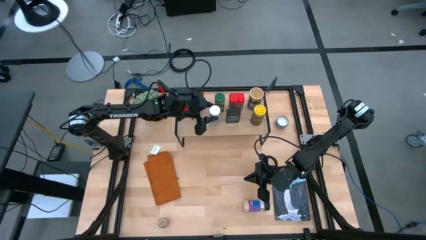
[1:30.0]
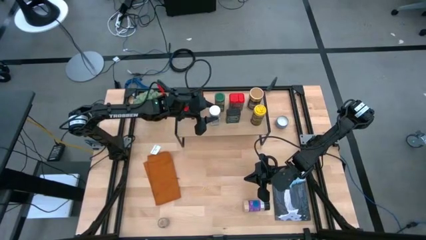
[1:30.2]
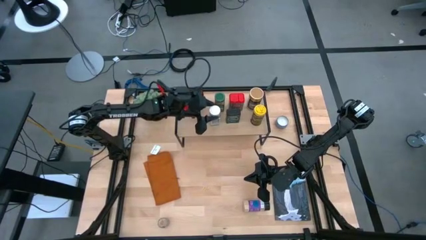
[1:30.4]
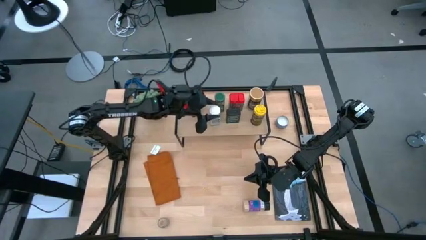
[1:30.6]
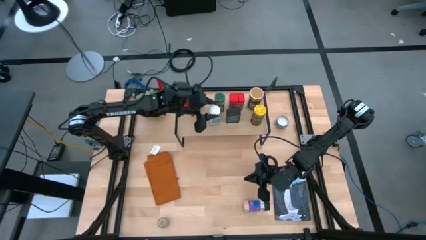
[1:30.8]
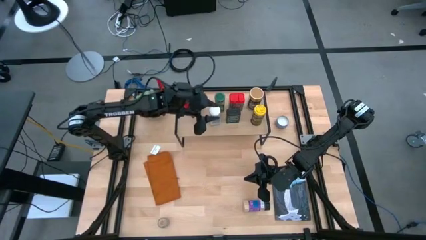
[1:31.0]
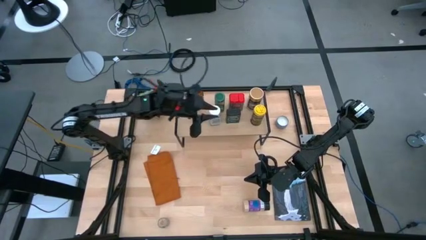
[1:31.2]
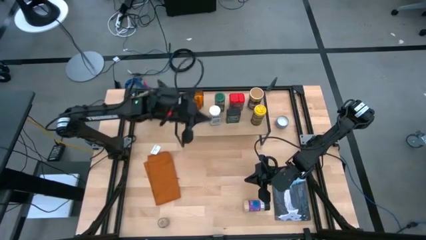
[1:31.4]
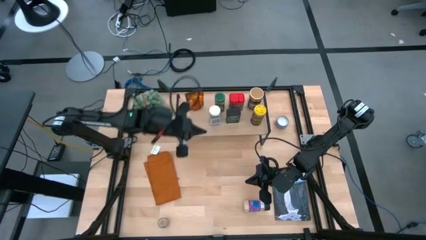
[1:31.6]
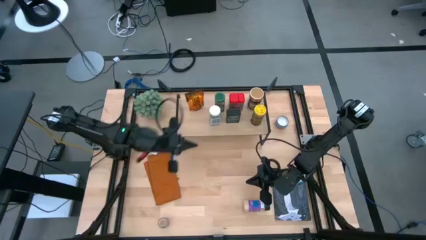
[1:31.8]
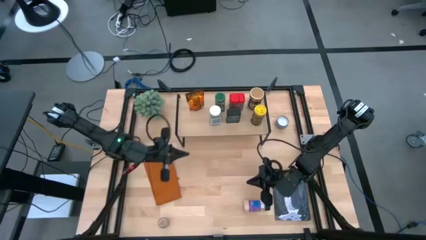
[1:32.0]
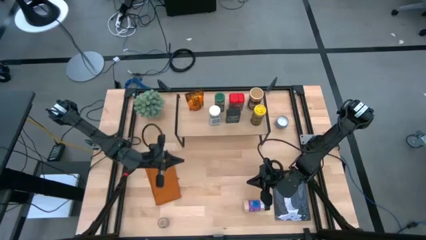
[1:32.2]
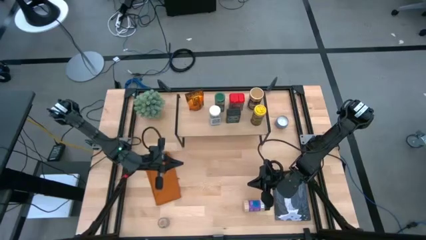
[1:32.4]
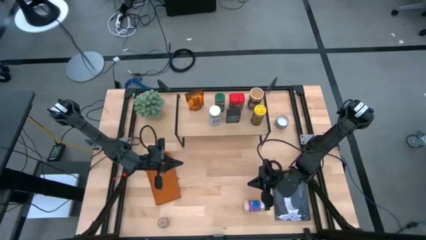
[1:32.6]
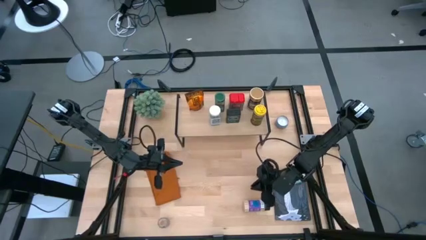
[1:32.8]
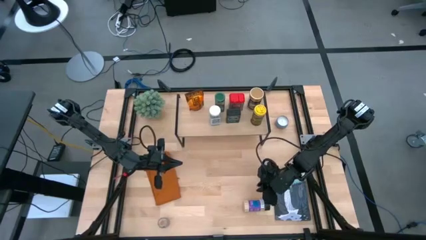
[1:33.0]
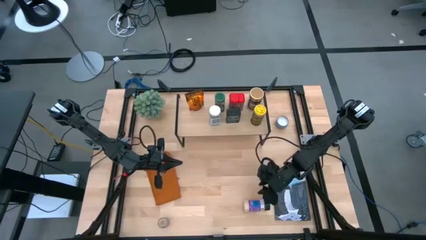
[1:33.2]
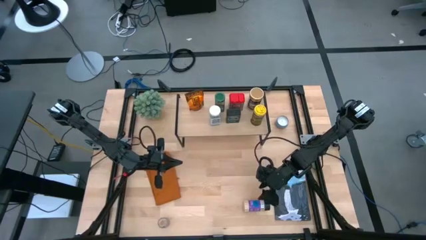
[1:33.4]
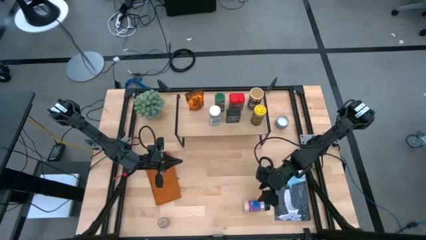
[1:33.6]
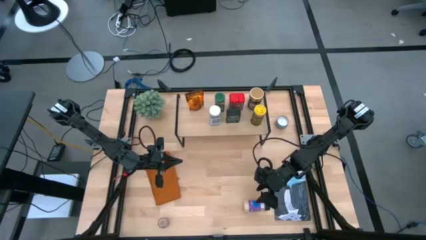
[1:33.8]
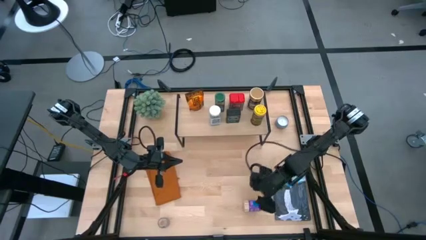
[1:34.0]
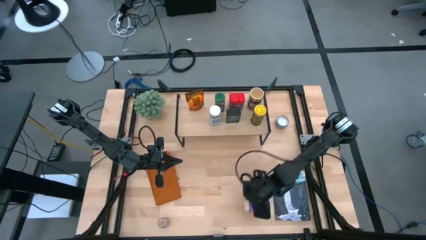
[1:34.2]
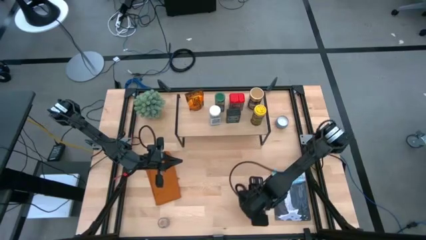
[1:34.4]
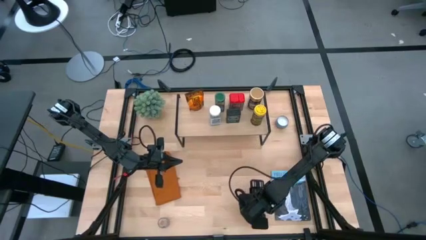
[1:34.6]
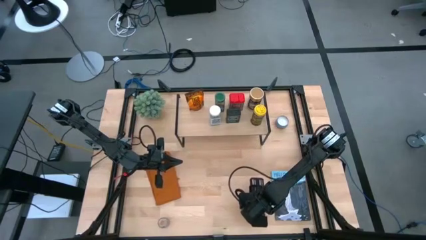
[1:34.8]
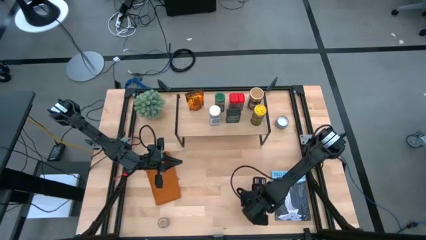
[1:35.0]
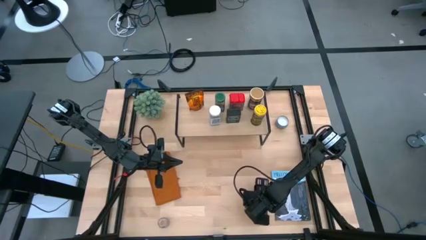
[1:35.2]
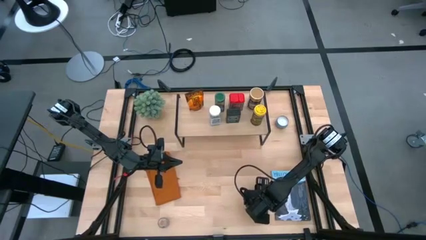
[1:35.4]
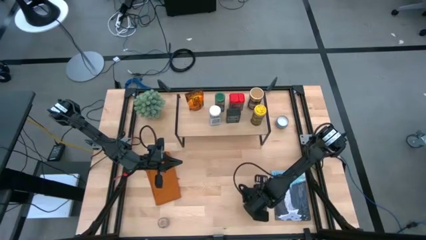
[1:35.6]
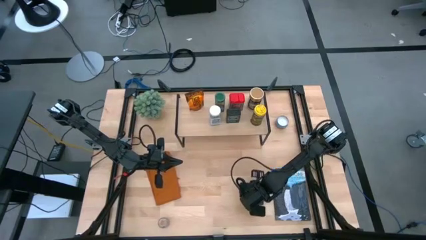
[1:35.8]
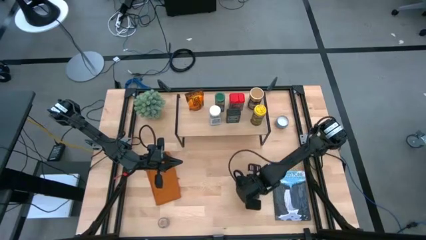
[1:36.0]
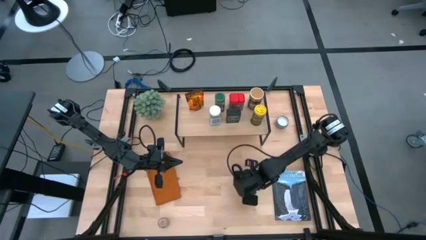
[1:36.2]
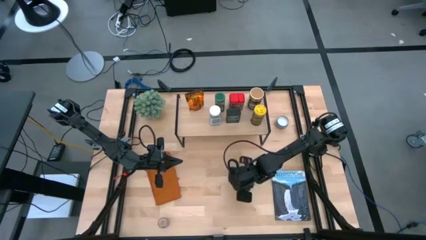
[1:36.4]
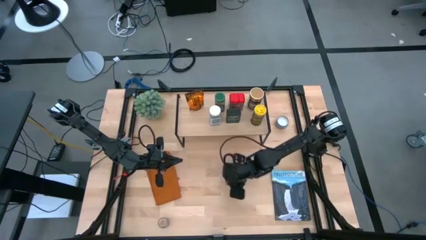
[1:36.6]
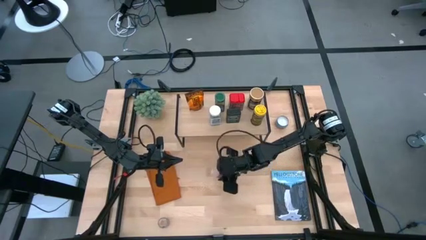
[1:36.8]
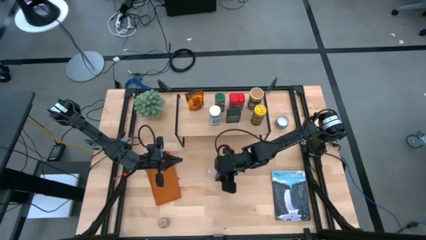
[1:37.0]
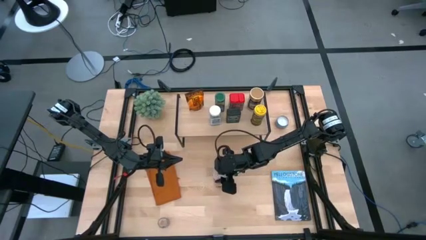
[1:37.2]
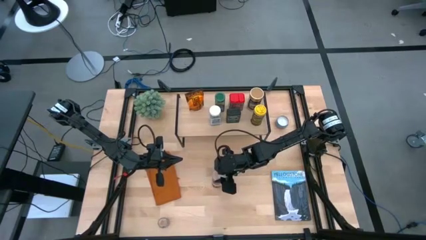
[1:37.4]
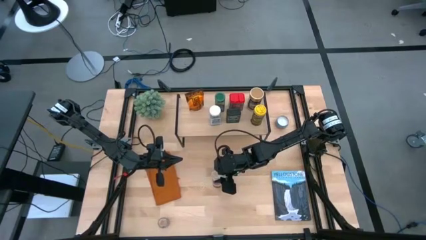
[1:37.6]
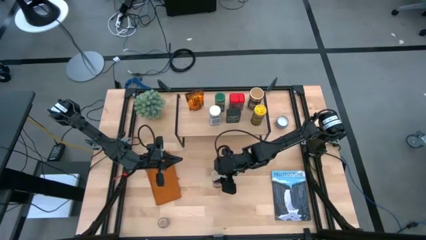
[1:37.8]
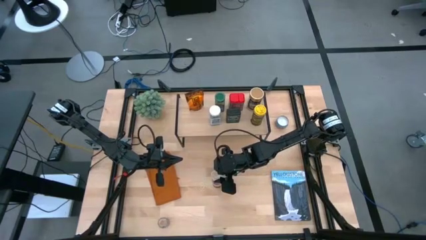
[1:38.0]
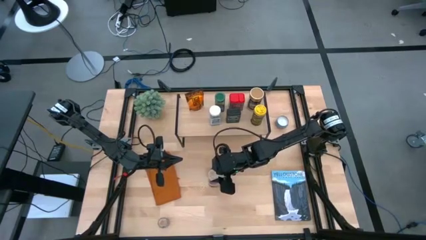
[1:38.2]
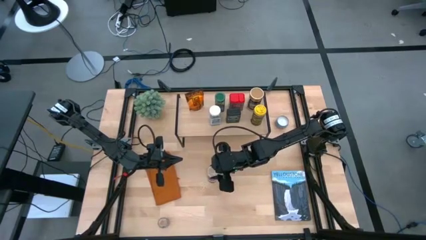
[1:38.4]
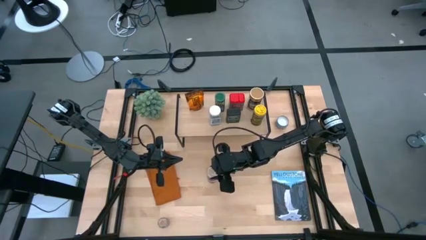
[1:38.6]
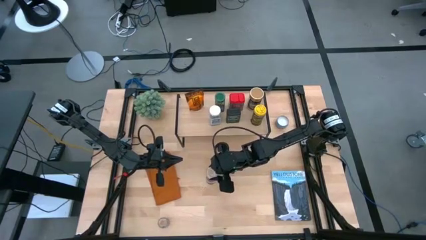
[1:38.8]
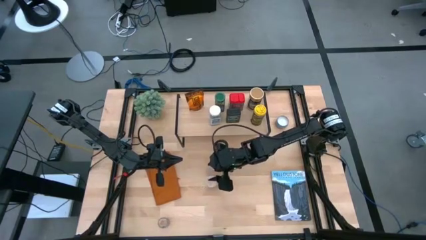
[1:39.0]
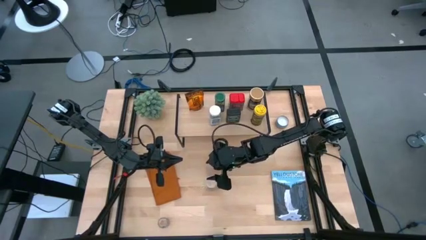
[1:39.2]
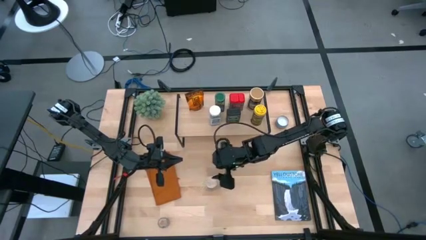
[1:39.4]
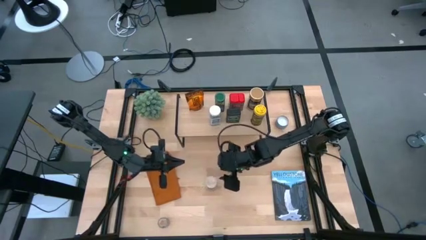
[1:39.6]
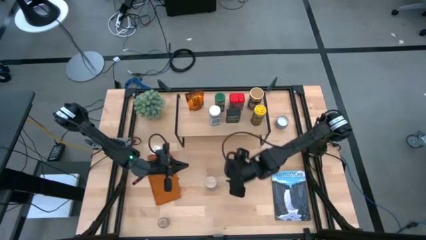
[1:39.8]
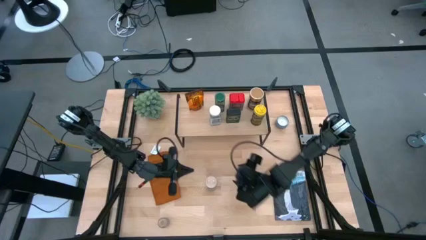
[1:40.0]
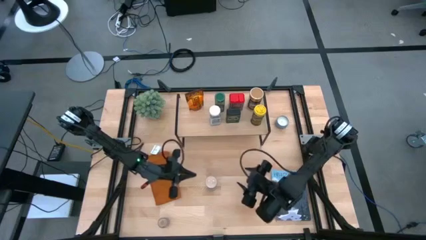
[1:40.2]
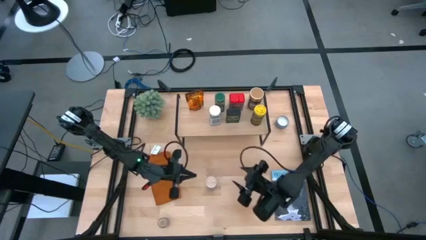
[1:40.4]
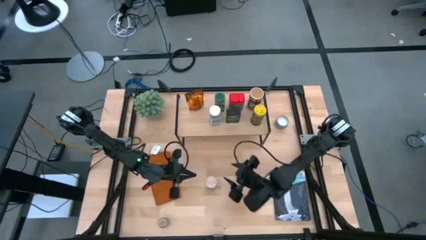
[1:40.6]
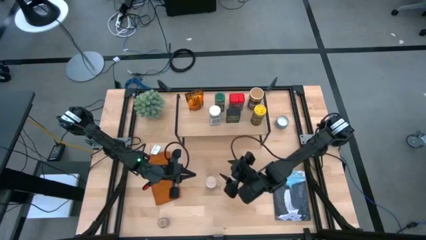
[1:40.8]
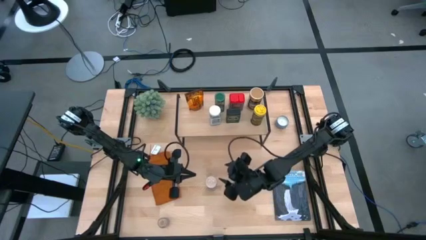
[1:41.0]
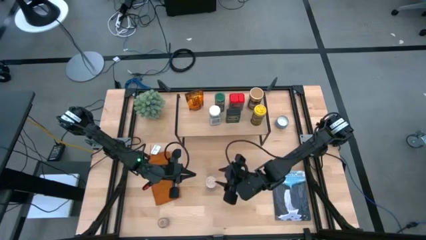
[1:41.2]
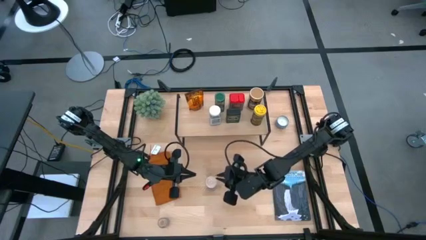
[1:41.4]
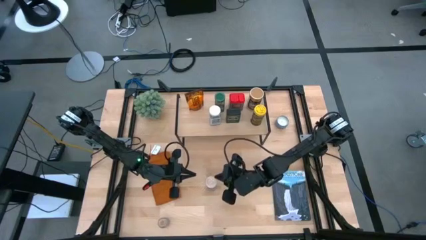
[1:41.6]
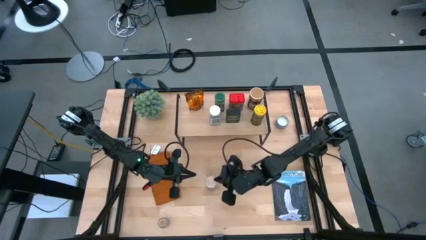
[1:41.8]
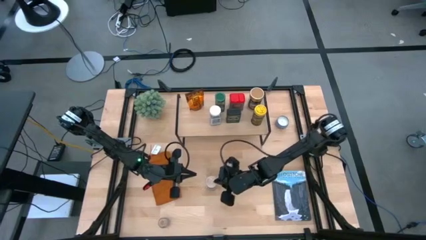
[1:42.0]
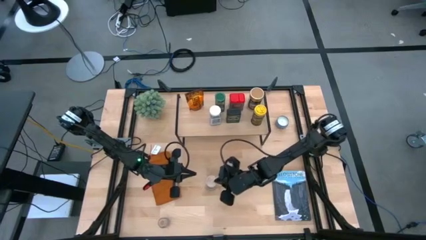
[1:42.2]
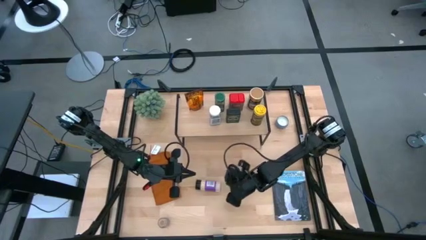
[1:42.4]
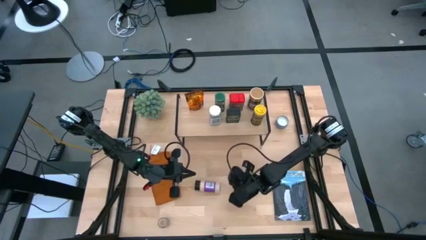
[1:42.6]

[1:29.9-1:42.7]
Task: Shelf spices
Put the black seasoning bottle on the shelf

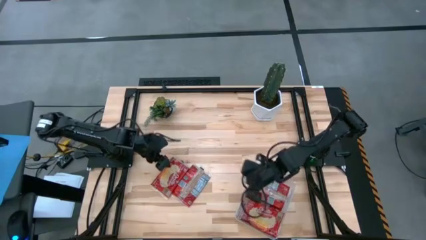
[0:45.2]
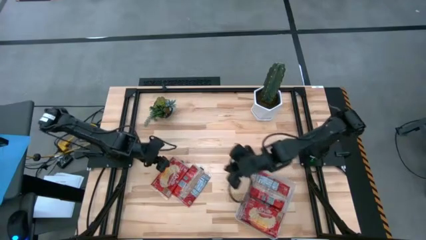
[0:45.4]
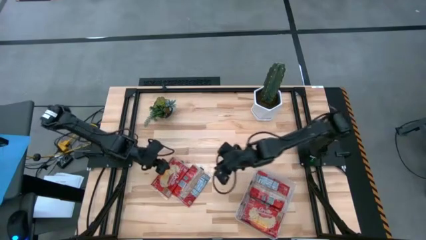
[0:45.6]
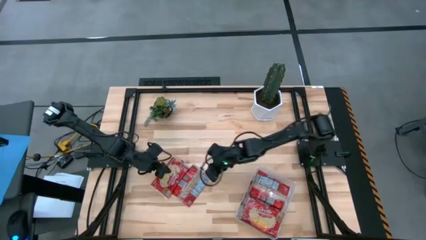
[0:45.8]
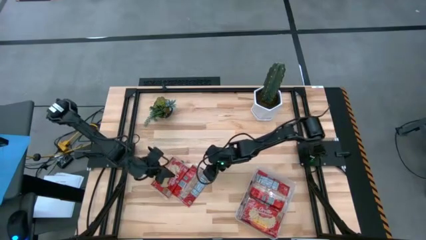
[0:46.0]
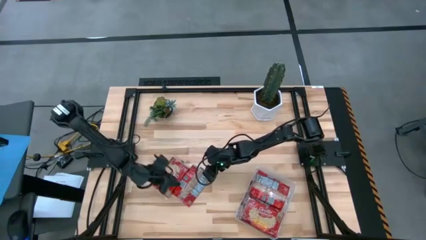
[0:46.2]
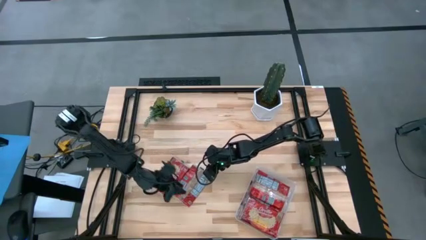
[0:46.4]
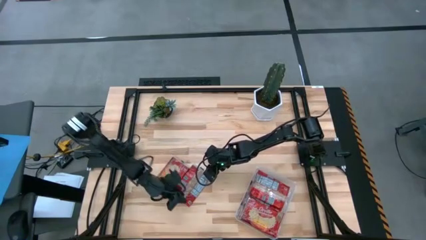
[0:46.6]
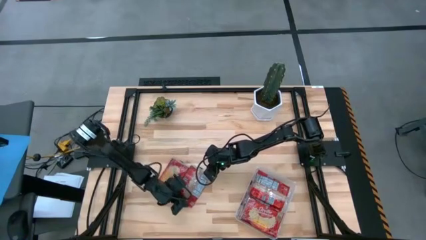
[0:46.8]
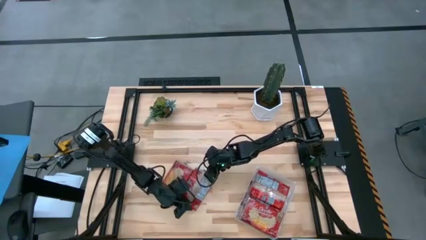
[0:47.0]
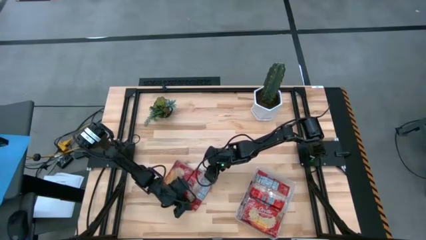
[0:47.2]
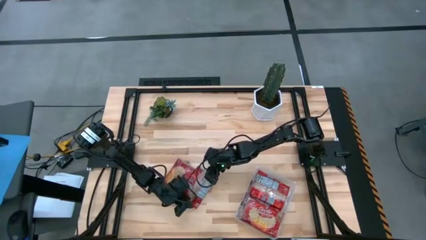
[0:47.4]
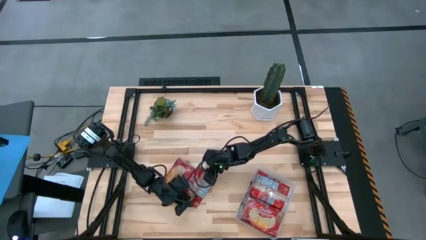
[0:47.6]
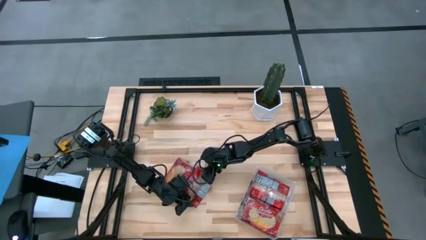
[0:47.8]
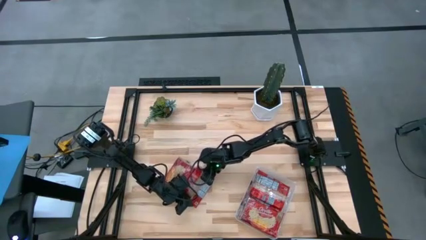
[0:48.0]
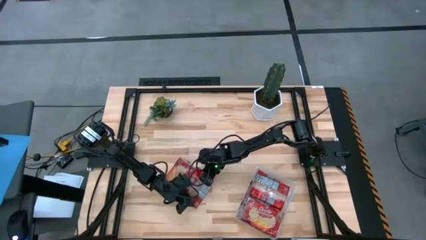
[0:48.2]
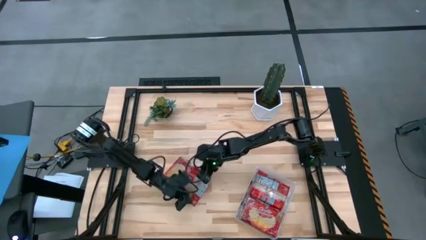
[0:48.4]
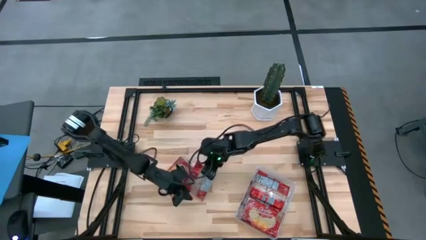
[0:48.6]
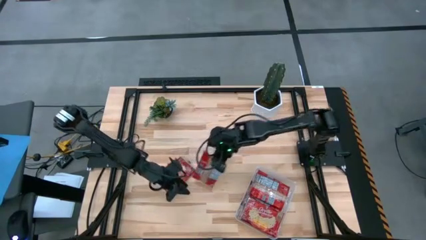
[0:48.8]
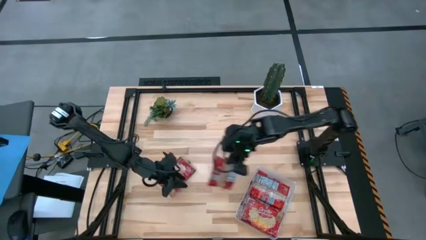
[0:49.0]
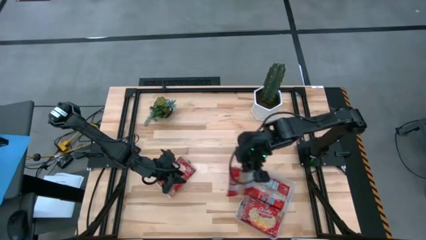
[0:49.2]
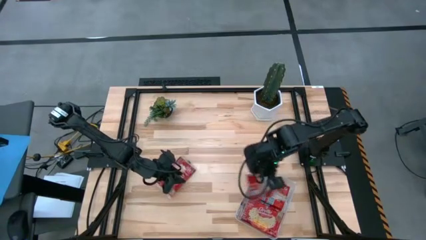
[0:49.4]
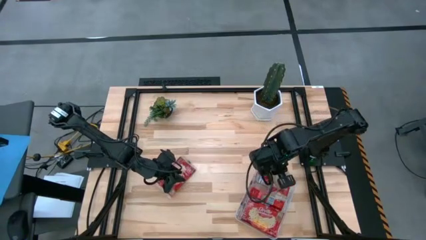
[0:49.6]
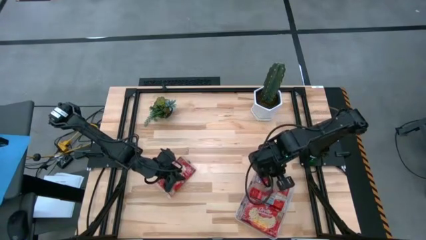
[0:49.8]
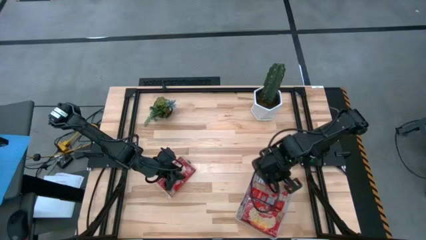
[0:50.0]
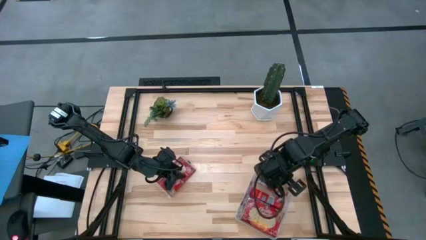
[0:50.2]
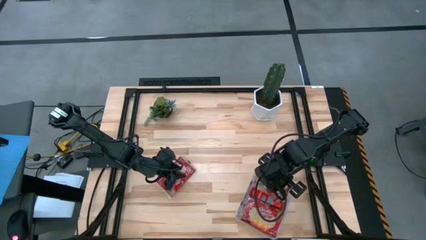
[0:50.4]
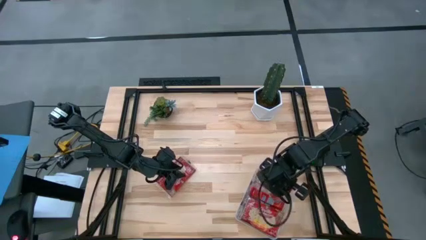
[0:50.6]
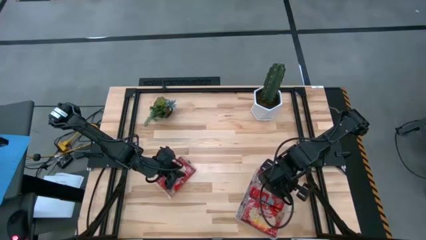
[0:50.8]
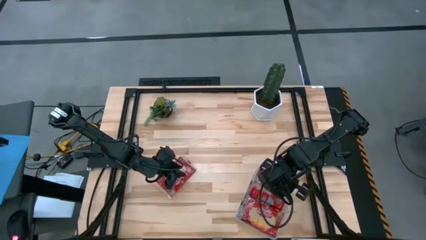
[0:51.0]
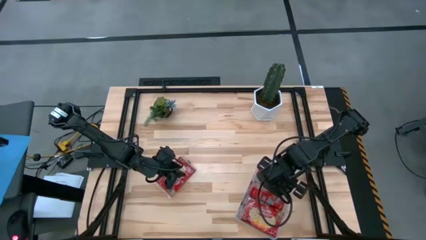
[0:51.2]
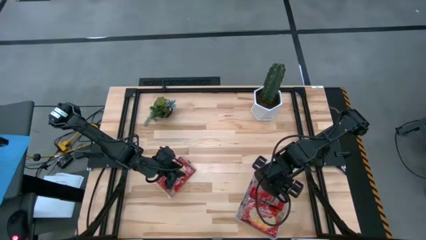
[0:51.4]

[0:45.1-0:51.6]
Task: Sort popcorn bags into baskets
Put the red popcorn bag into the transparent bin
